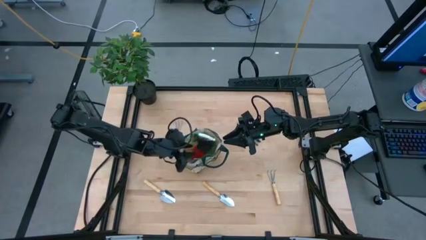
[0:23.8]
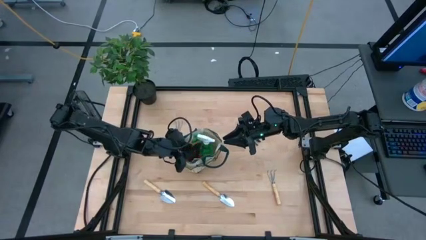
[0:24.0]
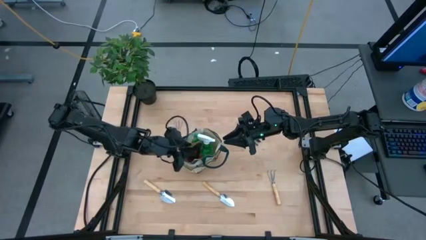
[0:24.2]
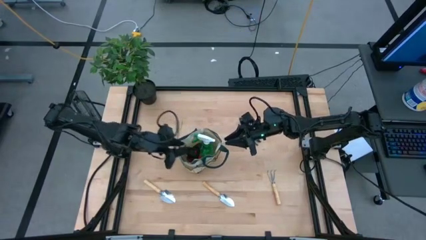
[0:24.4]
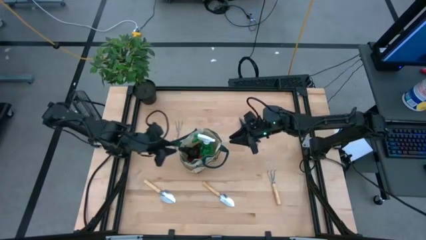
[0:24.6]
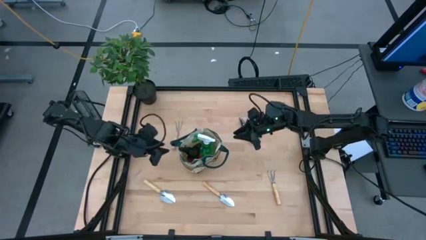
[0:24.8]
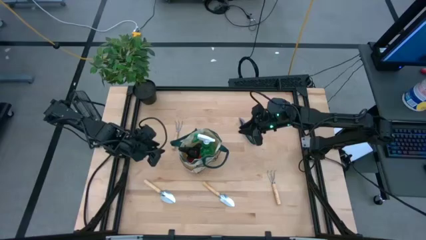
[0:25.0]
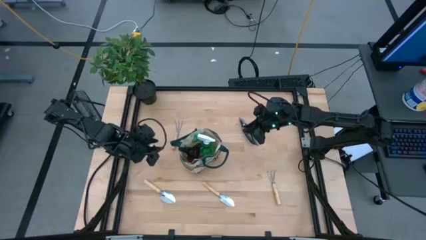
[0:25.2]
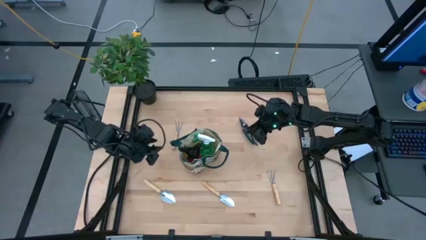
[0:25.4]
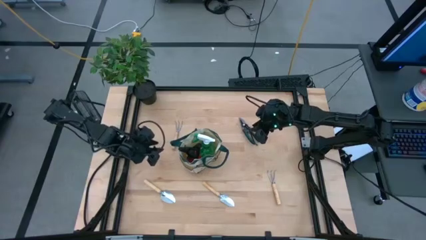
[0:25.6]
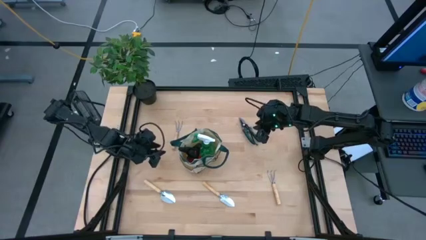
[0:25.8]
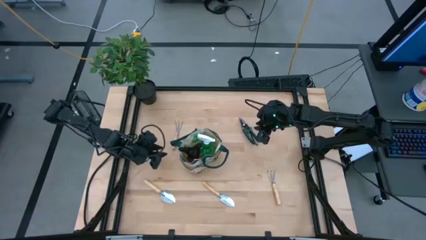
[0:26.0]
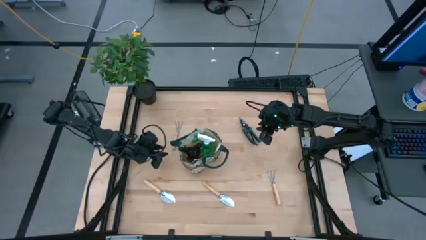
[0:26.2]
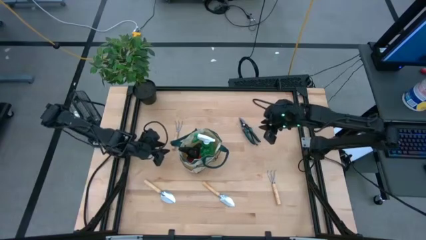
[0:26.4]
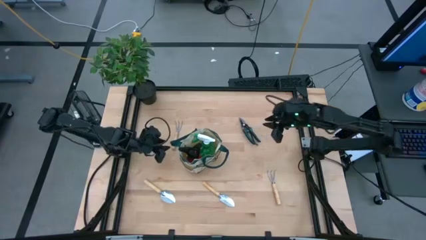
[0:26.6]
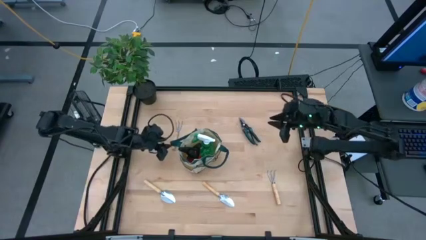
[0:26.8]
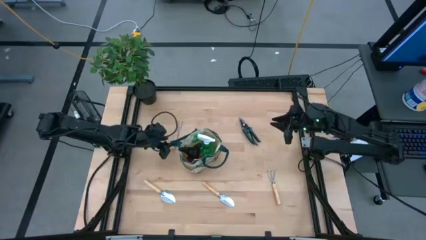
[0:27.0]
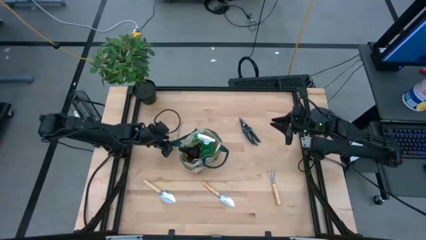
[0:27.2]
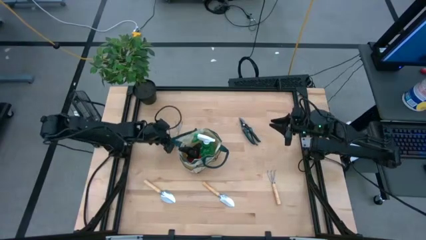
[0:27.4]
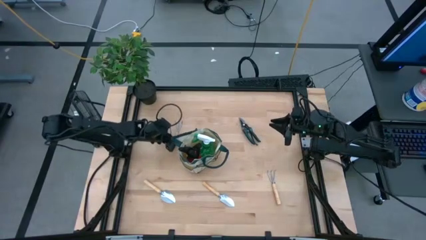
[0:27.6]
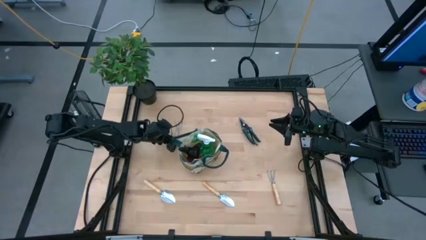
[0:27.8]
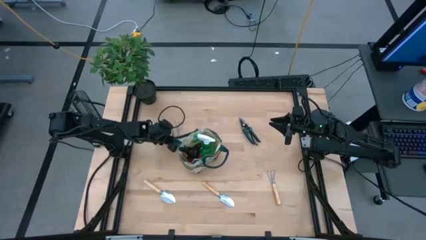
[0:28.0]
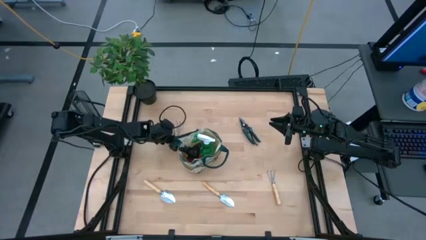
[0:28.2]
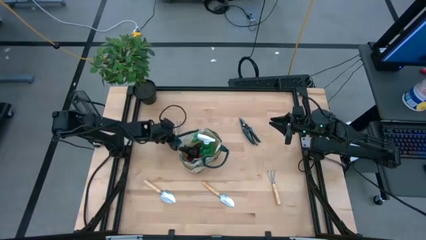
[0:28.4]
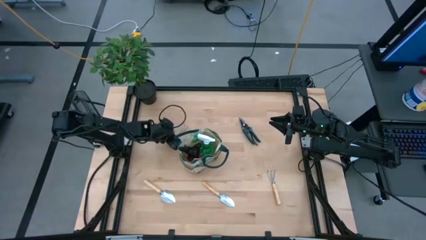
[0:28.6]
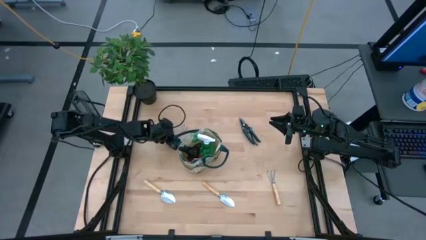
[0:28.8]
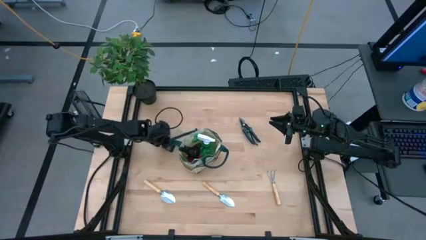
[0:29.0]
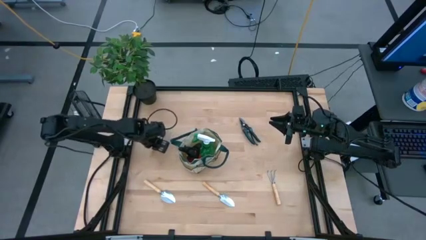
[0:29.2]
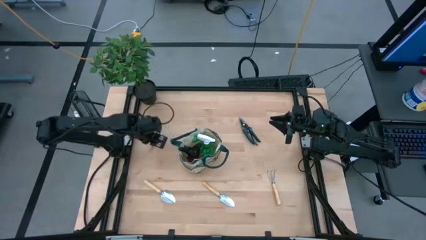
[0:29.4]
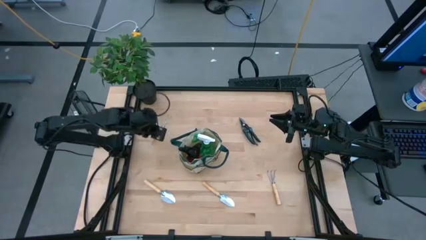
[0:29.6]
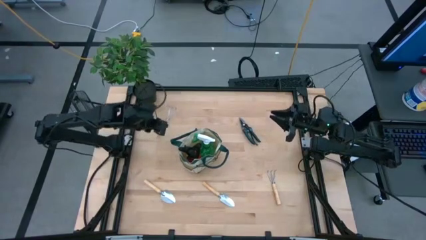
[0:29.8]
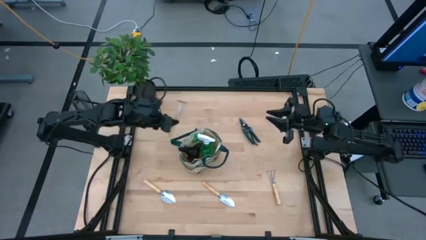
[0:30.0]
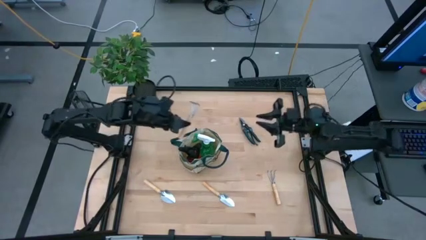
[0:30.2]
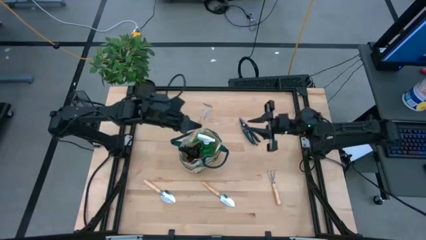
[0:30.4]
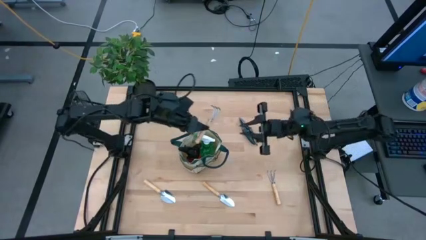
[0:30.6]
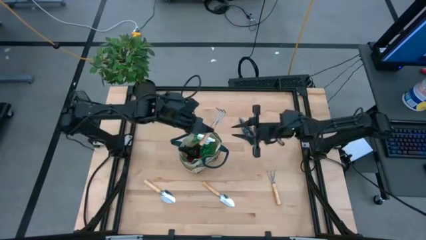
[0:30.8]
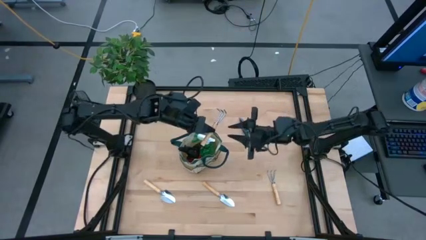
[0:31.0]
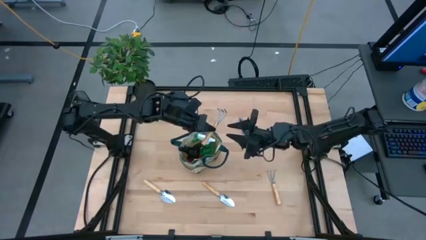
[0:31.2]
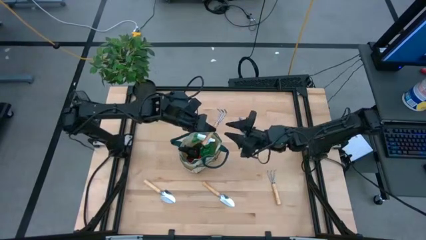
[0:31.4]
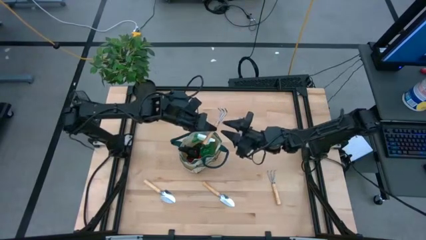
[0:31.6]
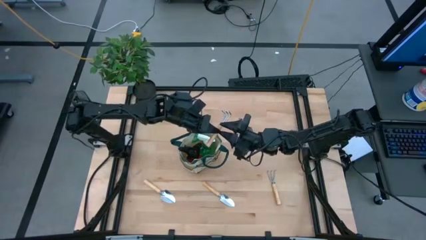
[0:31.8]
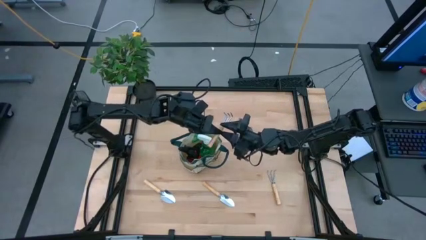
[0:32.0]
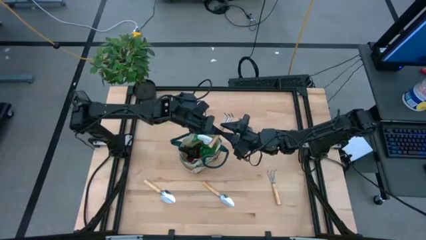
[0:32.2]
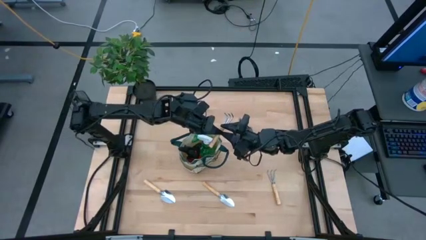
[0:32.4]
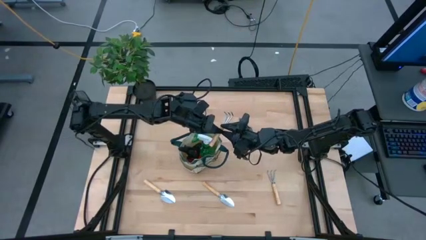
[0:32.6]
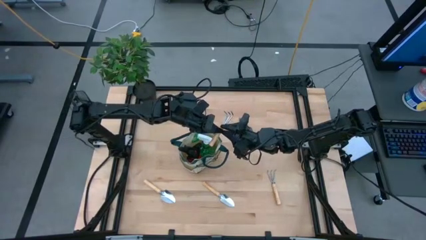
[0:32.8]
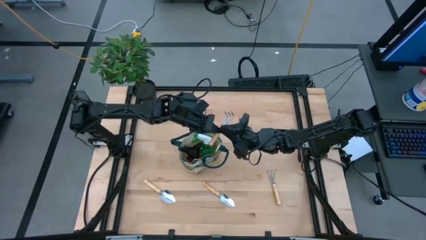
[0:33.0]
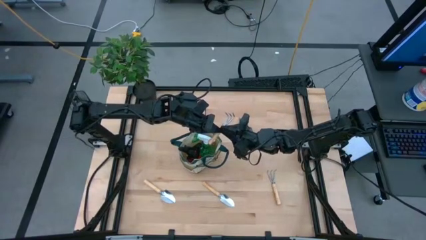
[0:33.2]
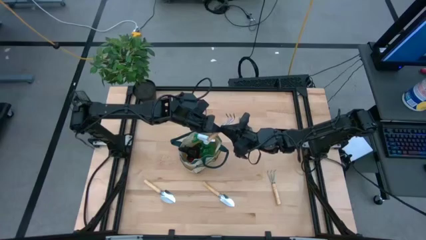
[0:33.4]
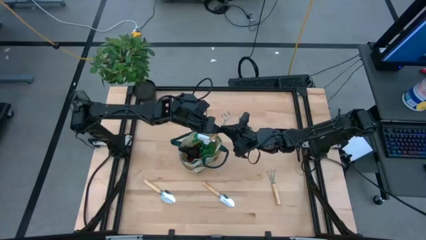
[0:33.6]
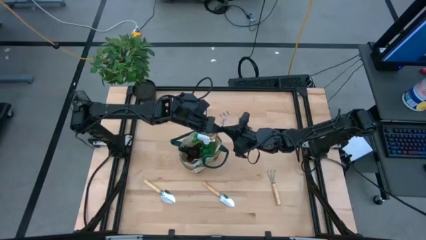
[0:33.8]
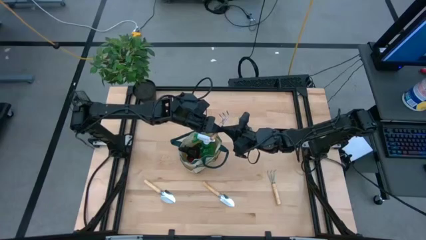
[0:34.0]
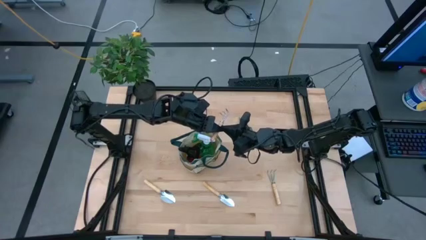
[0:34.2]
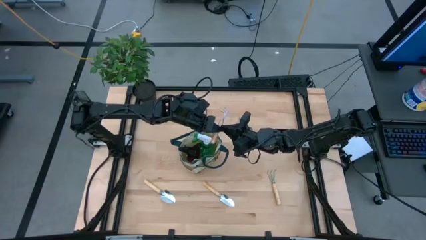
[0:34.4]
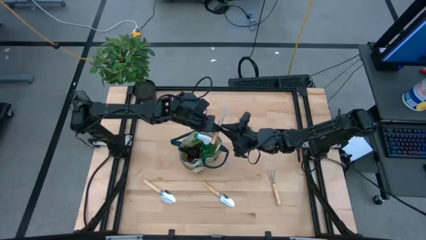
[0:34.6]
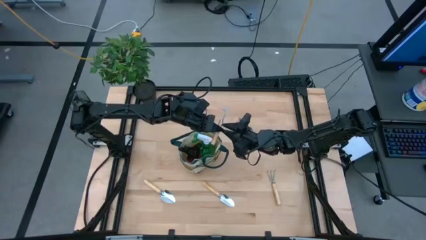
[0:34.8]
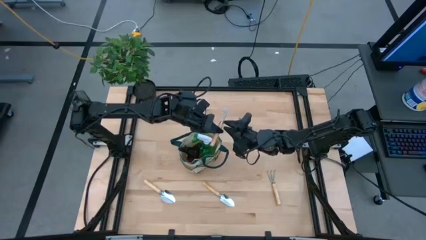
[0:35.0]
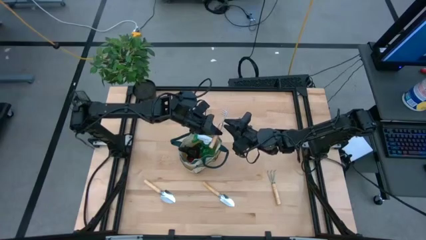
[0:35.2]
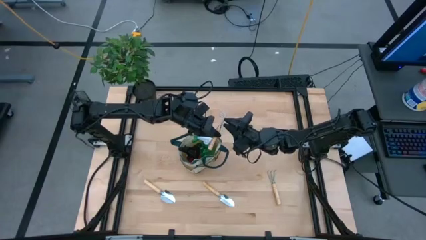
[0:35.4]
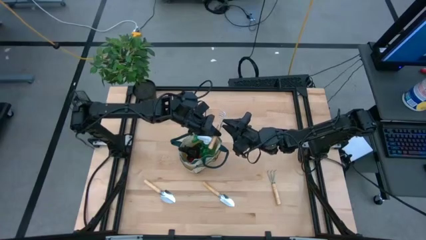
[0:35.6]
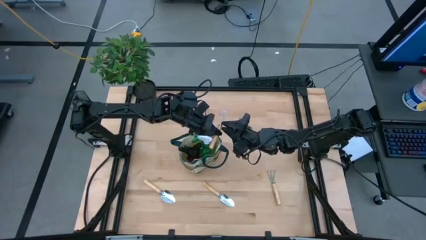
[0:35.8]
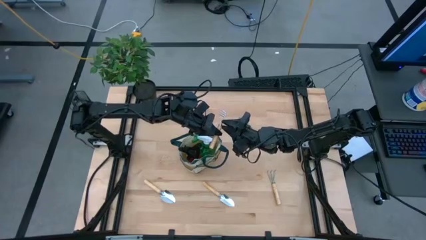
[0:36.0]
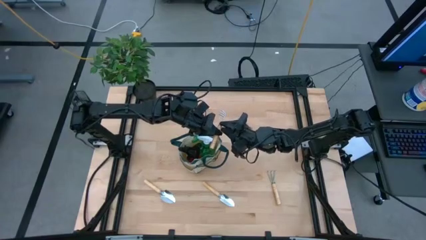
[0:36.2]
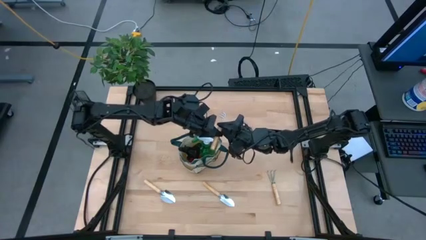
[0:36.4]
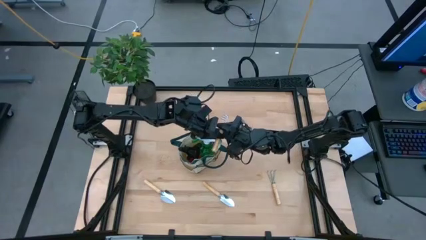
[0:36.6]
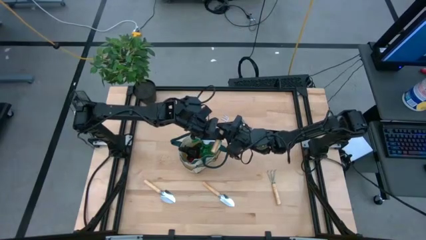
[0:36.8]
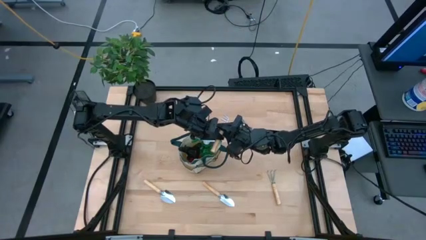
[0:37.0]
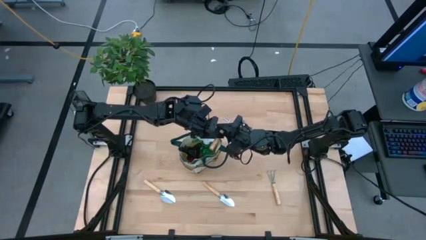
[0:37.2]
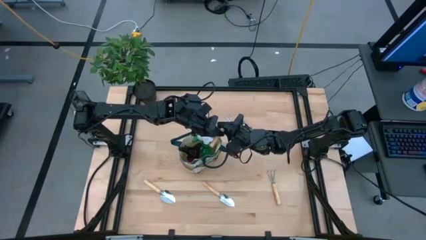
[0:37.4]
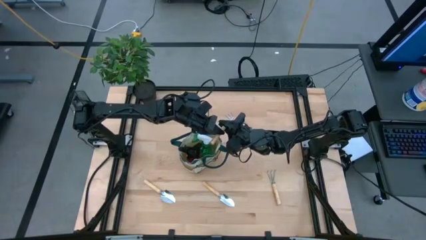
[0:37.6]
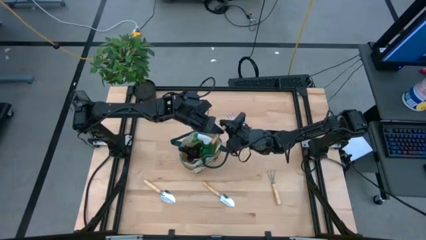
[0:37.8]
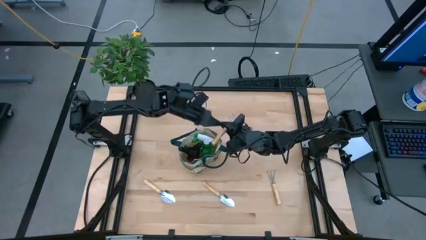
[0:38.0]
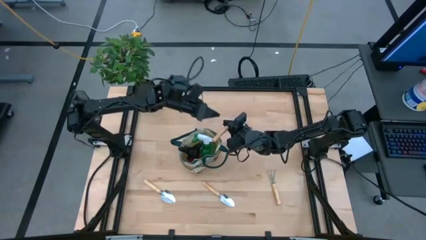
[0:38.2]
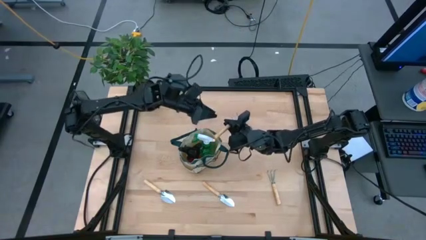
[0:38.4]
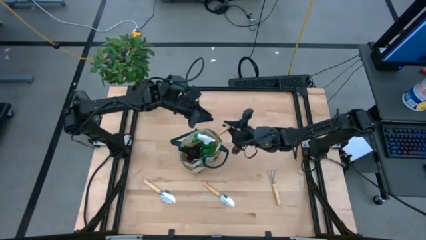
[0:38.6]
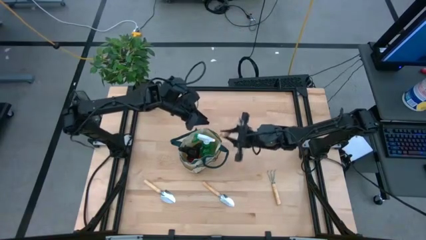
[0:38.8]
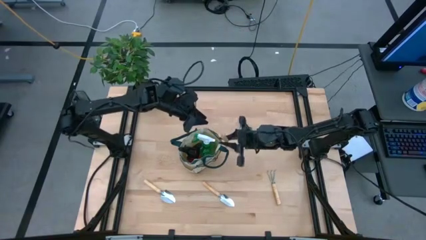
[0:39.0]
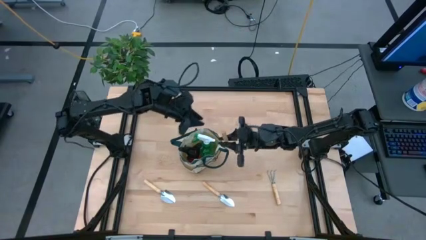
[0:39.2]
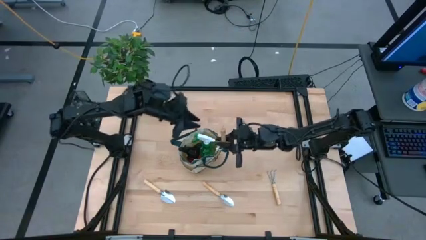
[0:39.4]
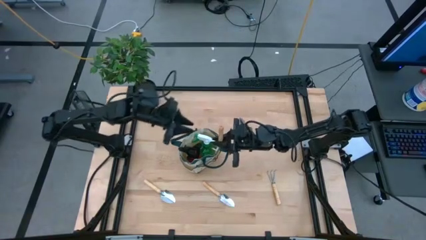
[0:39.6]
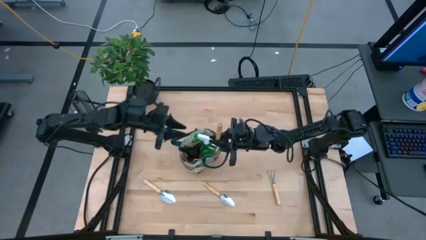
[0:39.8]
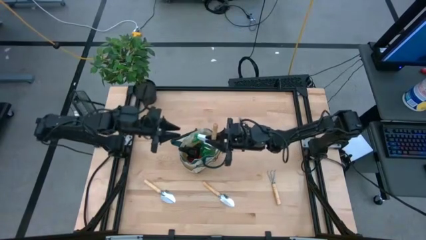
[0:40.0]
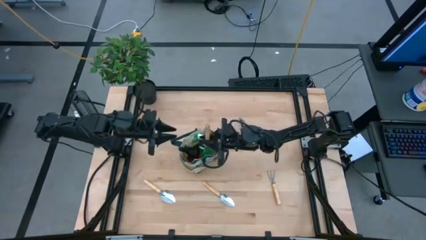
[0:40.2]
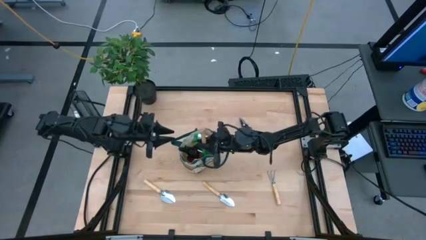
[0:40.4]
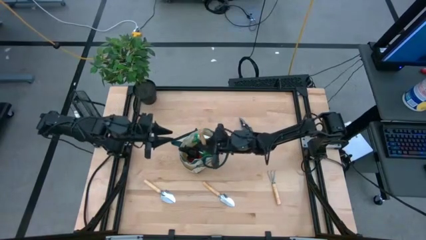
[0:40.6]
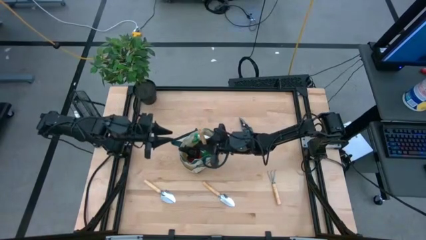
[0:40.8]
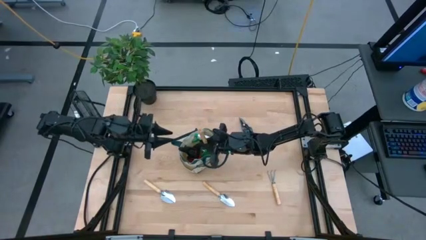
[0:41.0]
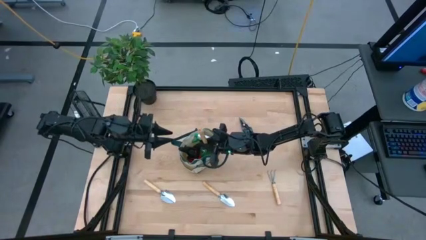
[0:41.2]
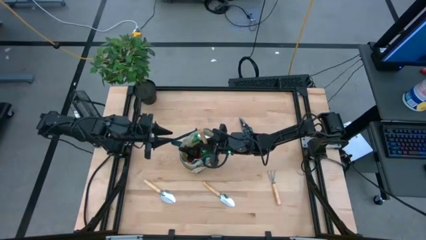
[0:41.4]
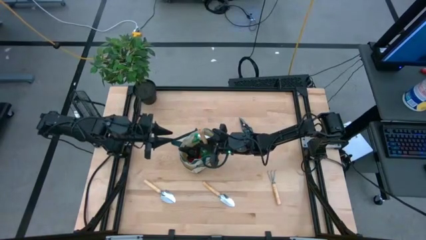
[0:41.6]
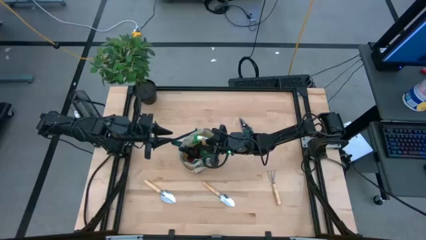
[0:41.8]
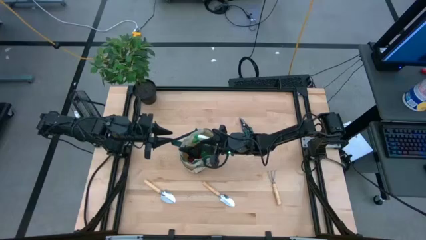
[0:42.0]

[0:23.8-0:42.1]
Task: Pick & Place Garden tools in Gardening bag
Put the top brown hand rake into the gardening bag
